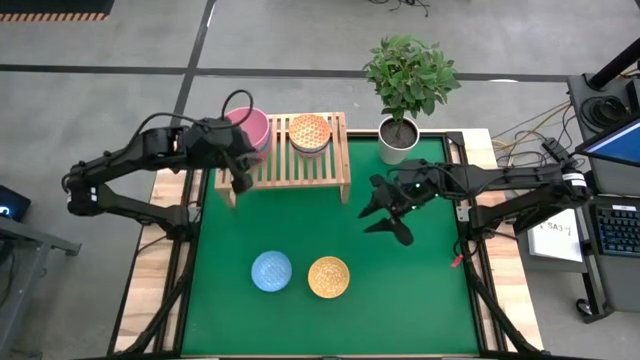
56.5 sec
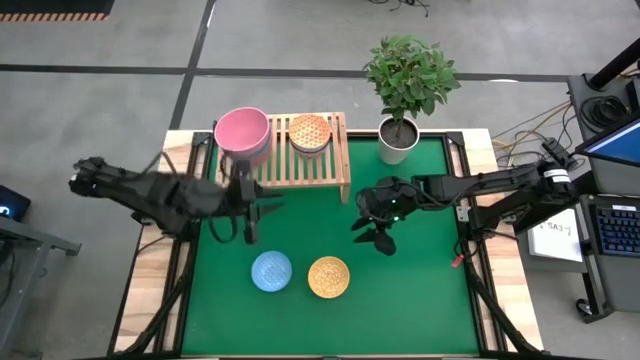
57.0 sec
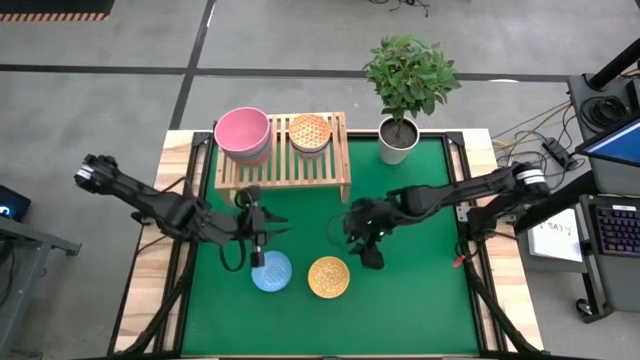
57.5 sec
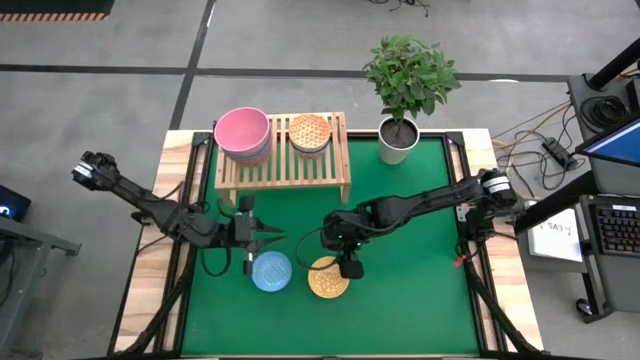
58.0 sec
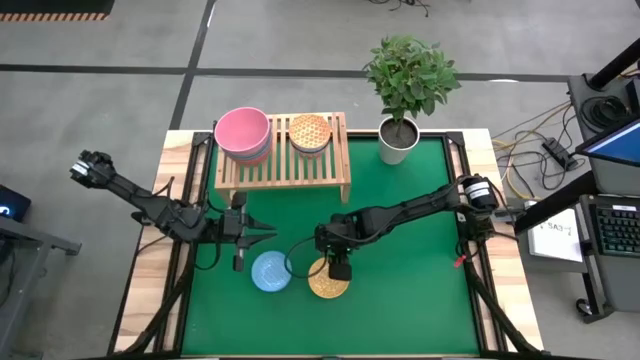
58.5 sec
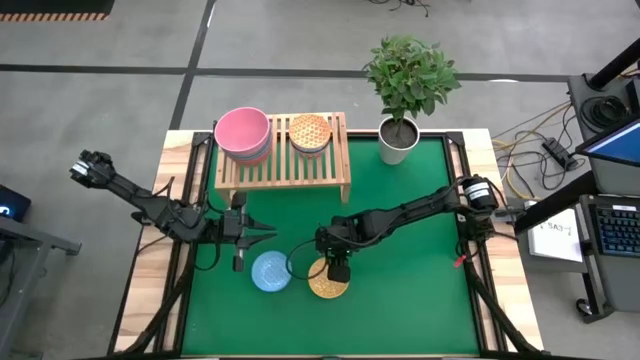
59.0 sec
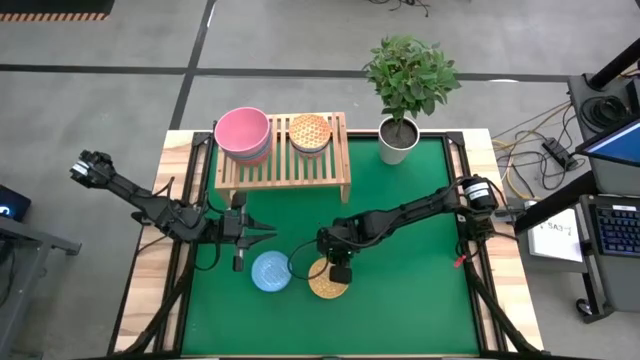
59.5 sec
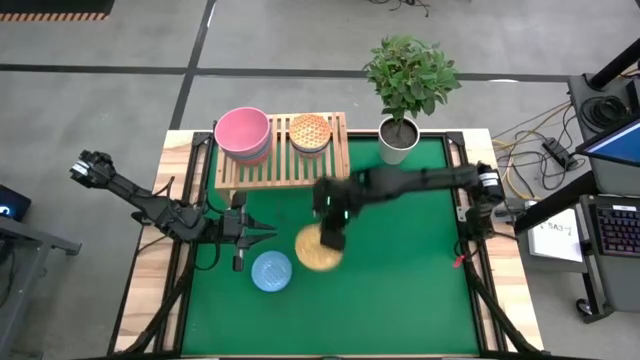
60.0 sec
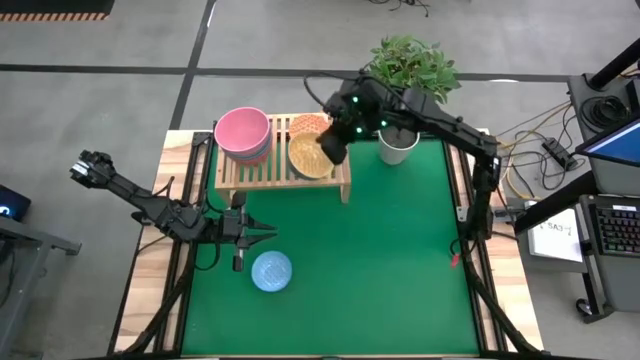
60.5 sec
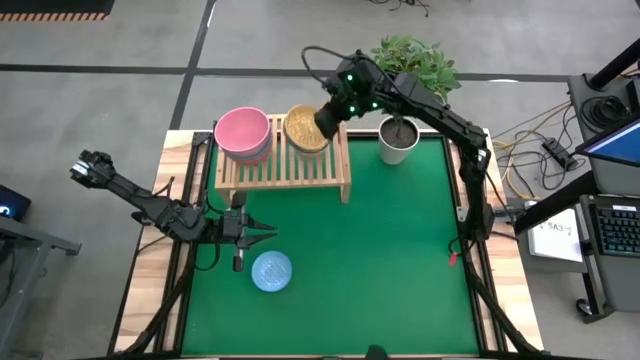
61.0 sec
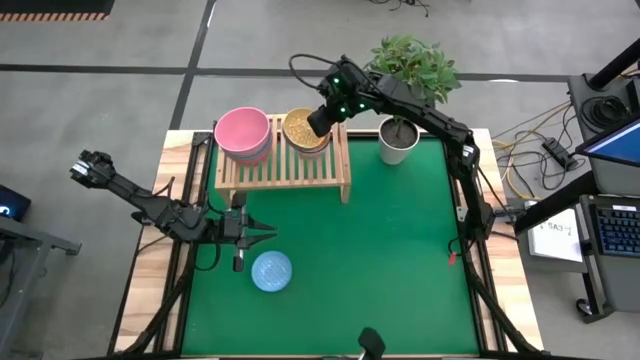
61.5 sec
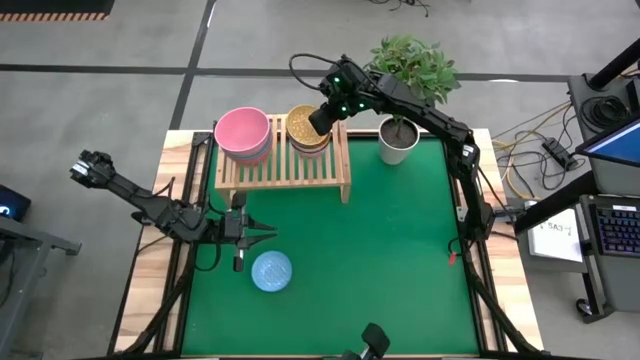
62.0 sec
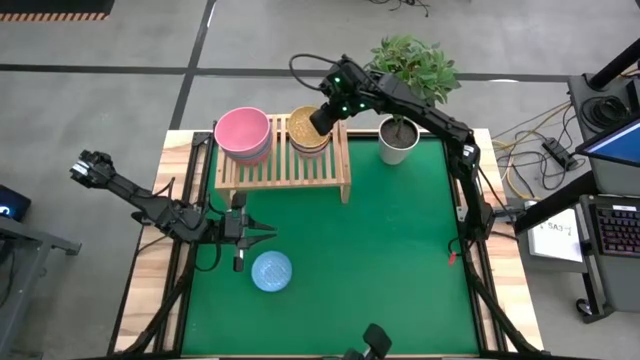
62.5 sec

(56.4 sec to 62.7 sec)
Task: Place and stack bowls onto a shelf
Stack the yellow and blue patterned bowl in the orange and blue patterned bowl on the shelf

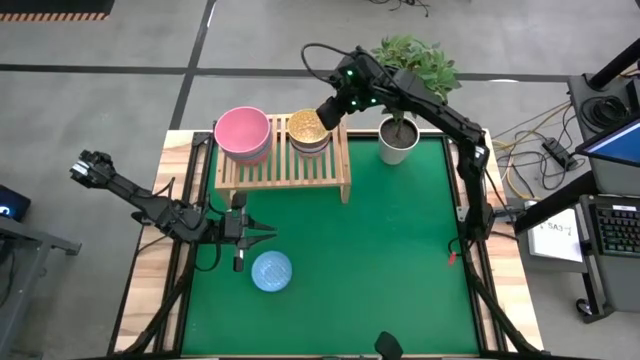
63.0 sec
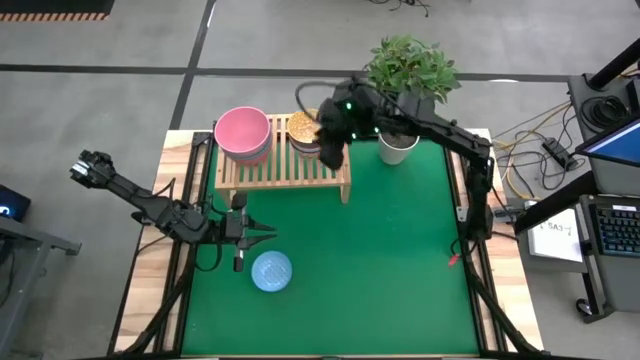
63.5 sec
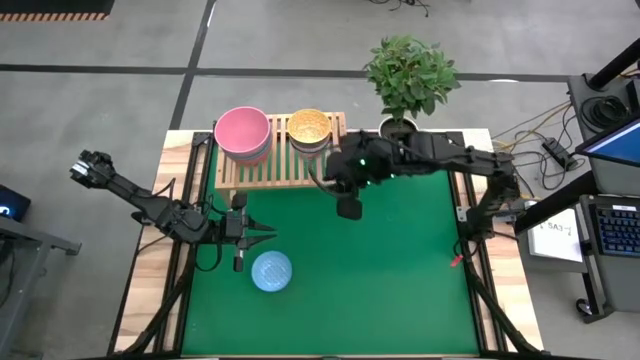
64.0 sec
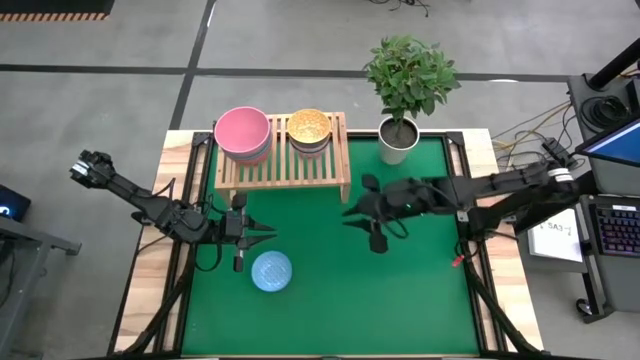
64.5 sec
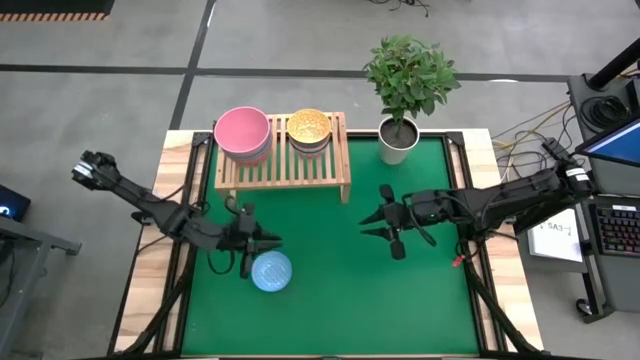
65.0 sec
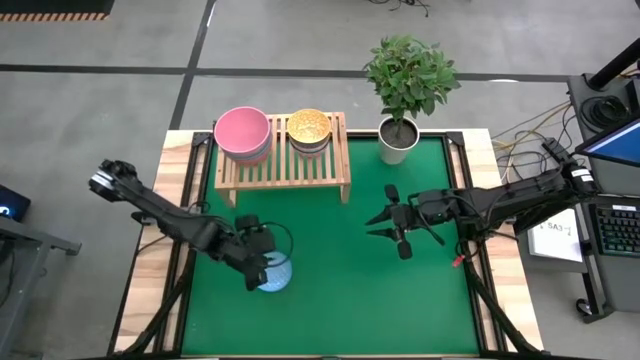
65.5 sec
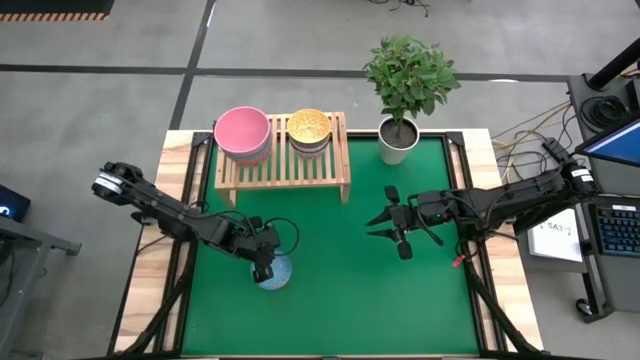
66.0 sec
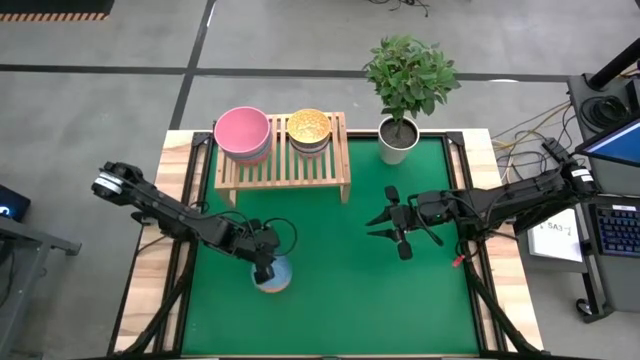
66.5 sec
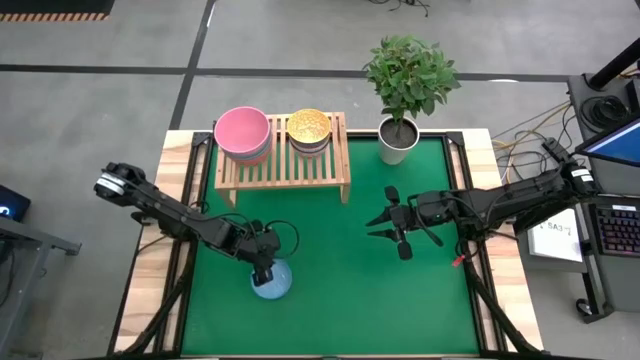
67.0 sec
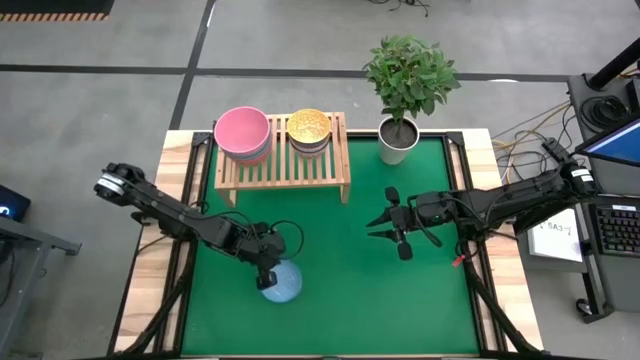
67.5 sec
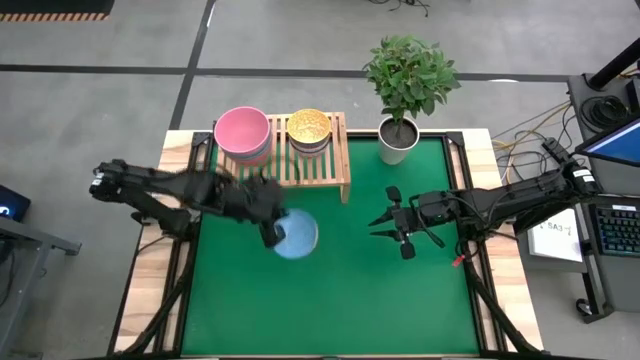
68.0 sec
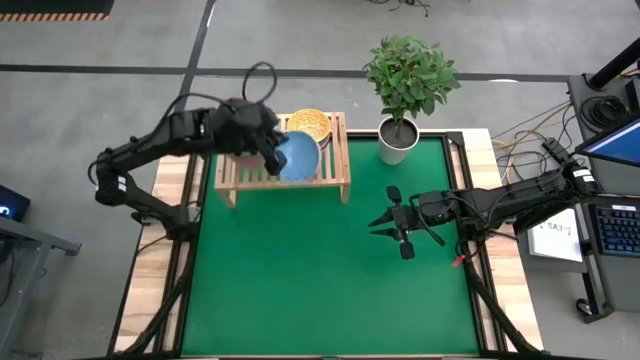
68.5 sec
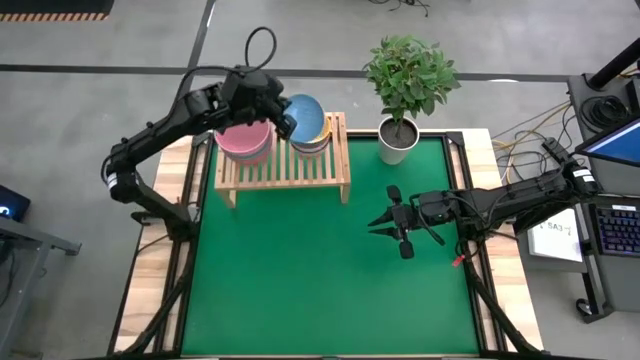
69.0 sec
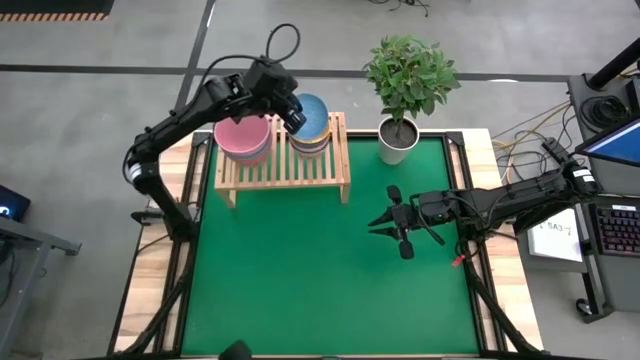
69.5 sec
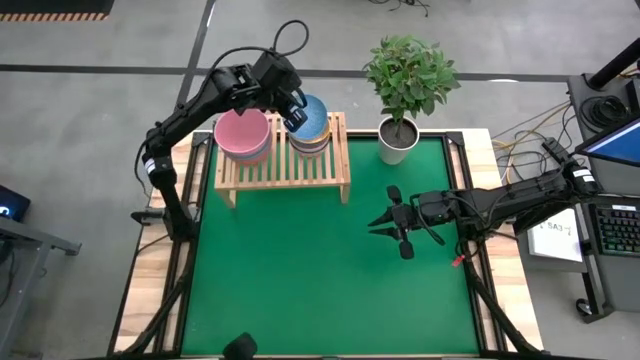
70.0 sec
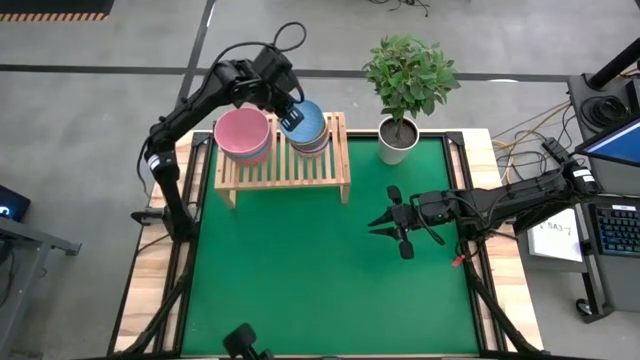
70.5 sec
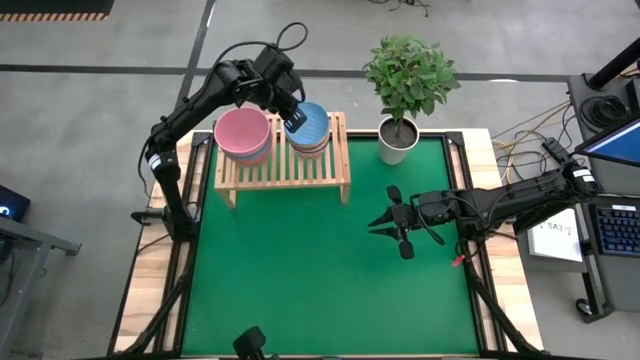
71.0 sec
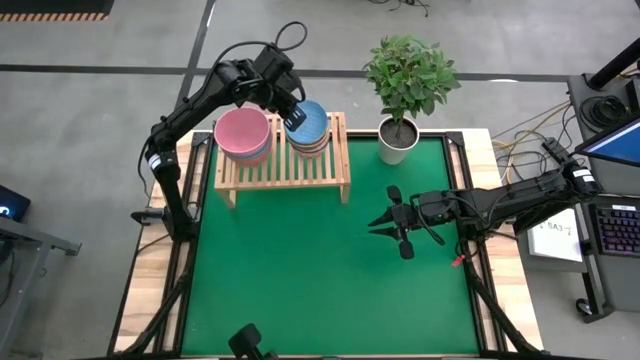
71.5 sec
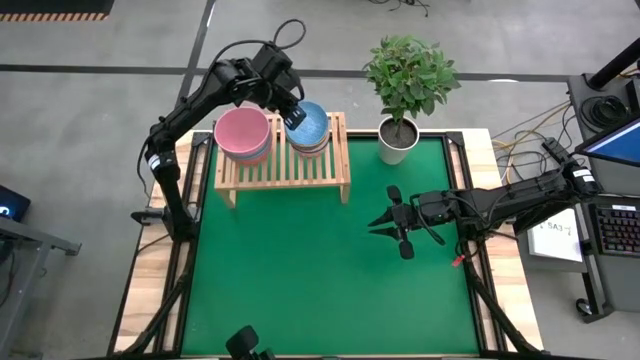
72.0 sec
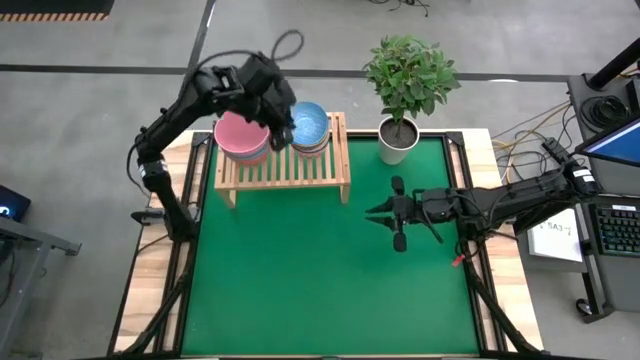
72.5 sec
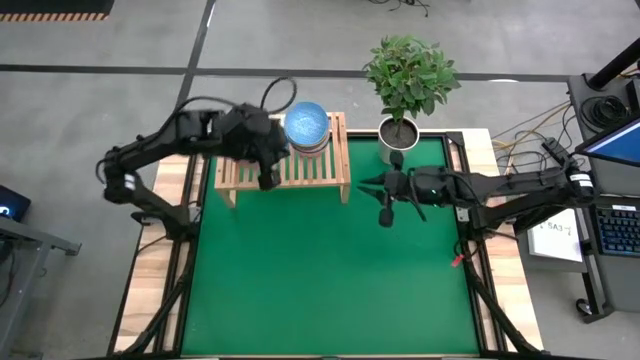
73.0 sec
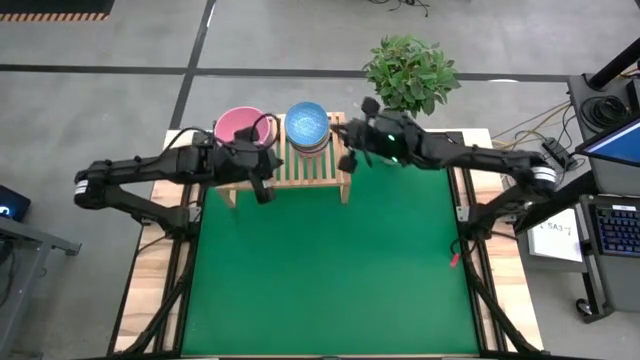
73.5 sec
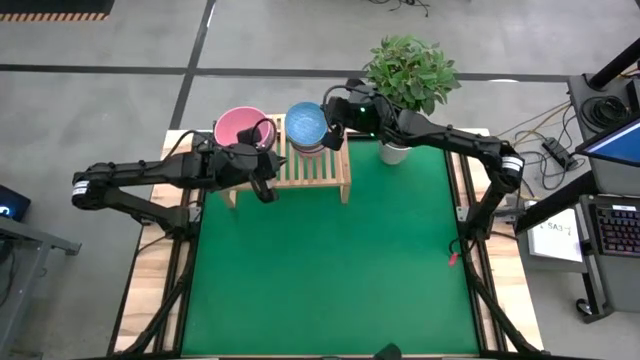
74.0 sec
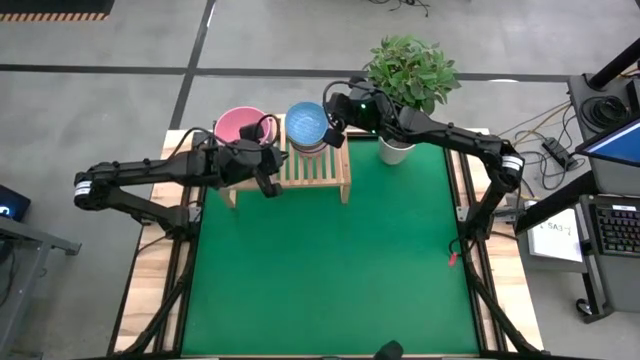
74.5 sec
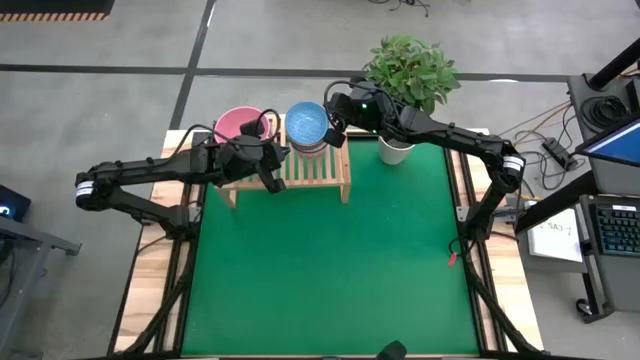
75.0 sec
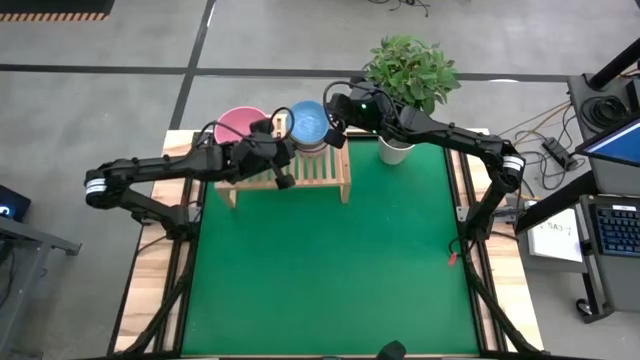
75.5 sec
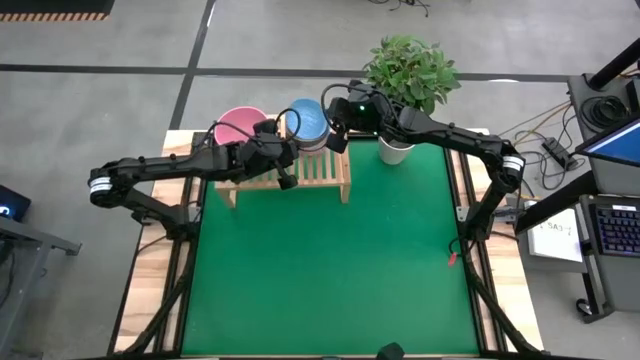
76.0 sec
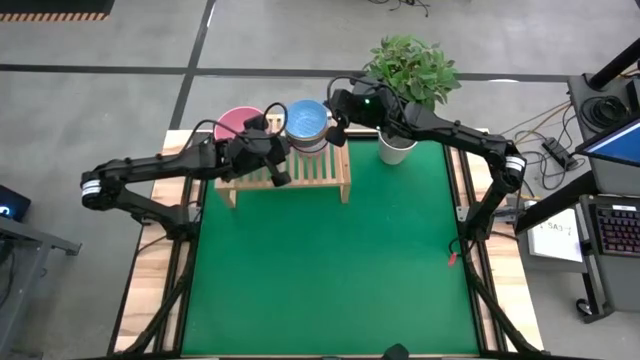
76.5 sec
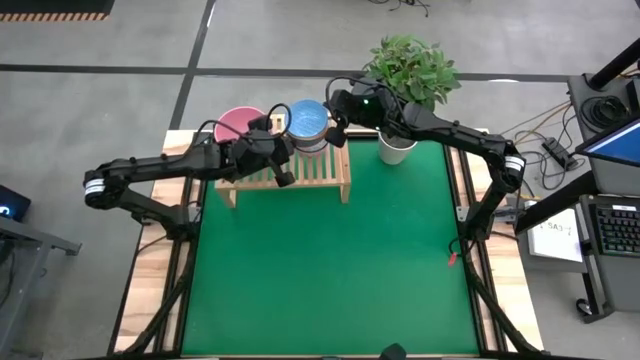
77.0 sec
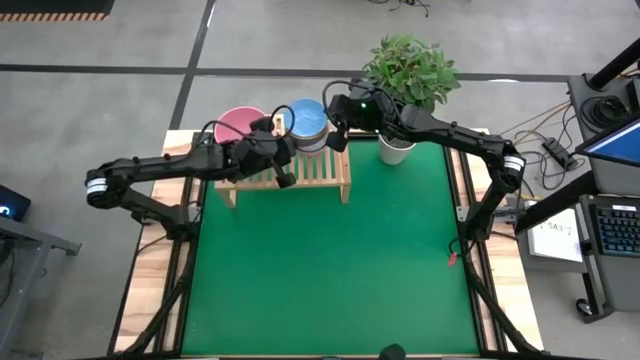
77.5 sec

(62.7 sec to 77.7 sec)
Stack the blue and orange patterned bowl in the yellow and blue patterned bowl on the shelf
